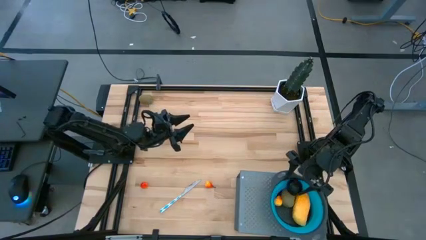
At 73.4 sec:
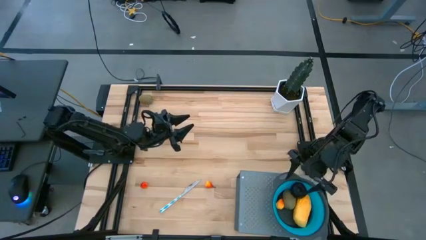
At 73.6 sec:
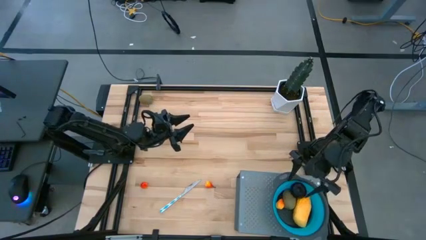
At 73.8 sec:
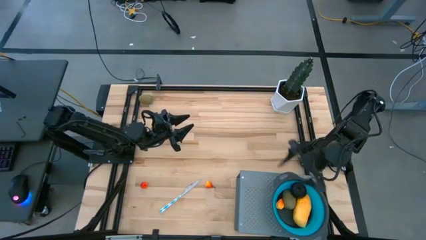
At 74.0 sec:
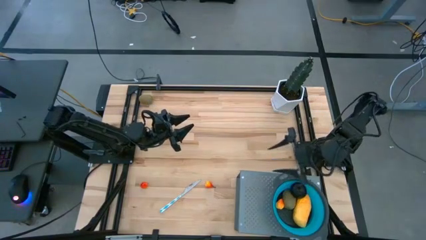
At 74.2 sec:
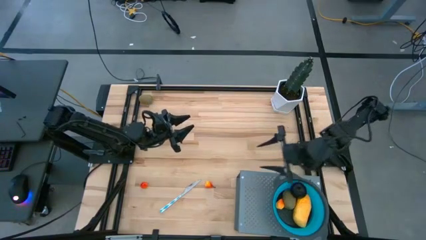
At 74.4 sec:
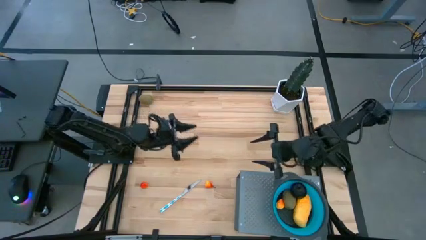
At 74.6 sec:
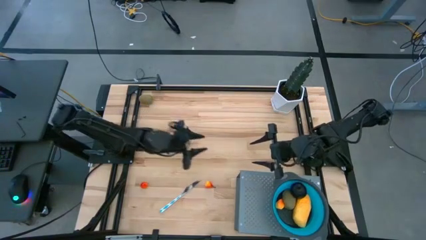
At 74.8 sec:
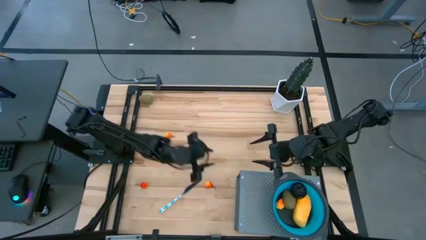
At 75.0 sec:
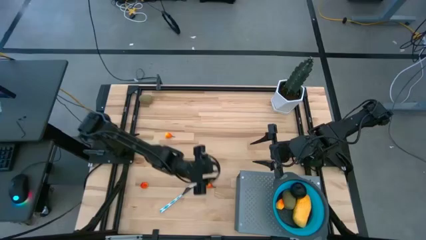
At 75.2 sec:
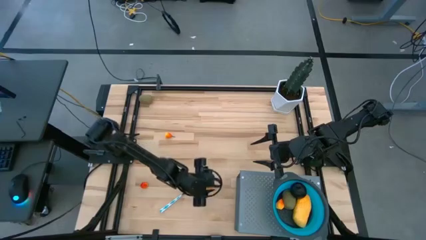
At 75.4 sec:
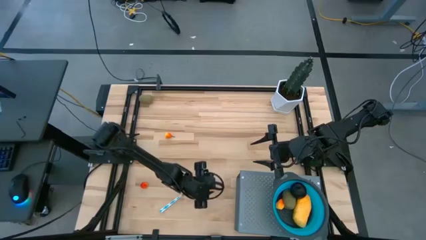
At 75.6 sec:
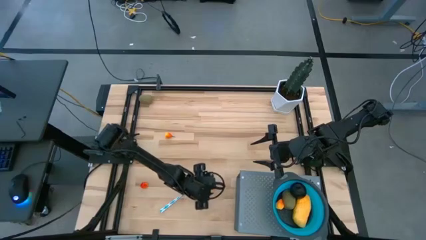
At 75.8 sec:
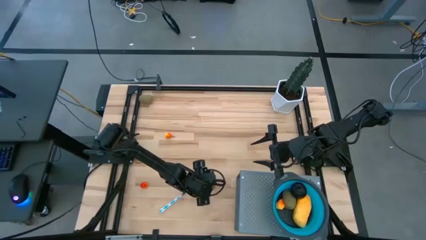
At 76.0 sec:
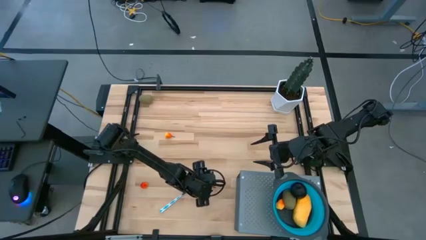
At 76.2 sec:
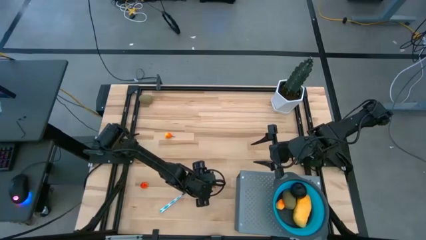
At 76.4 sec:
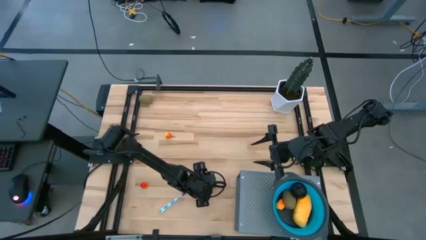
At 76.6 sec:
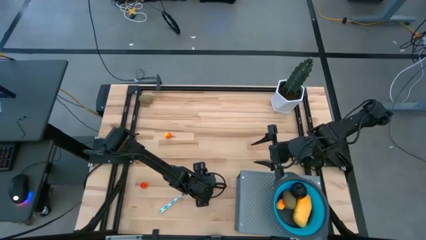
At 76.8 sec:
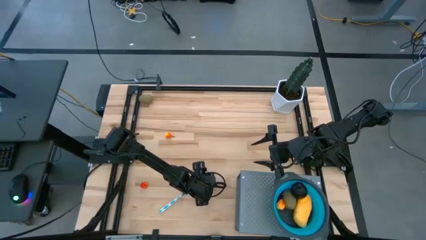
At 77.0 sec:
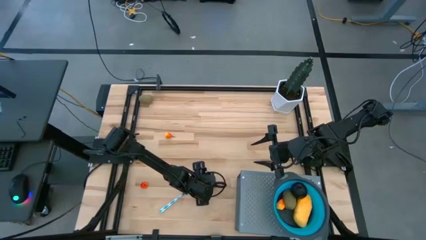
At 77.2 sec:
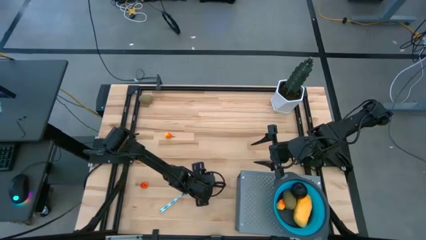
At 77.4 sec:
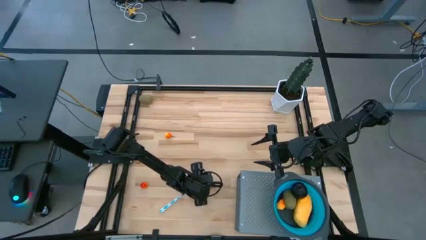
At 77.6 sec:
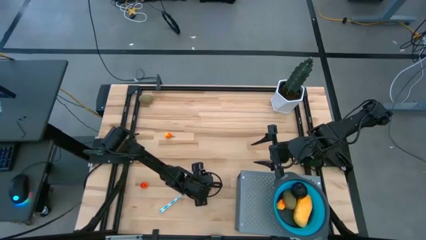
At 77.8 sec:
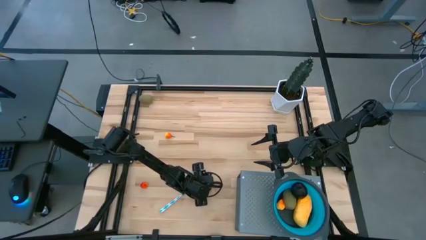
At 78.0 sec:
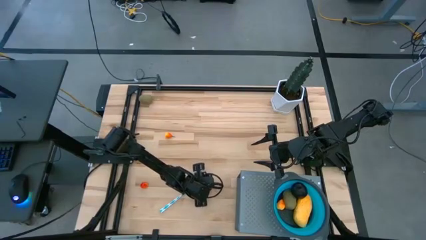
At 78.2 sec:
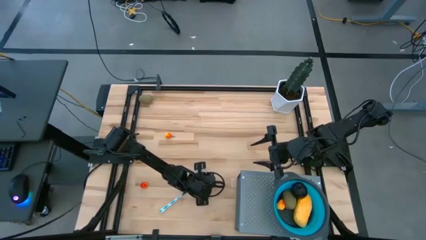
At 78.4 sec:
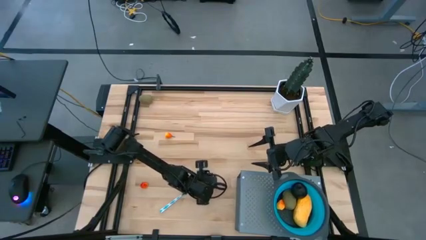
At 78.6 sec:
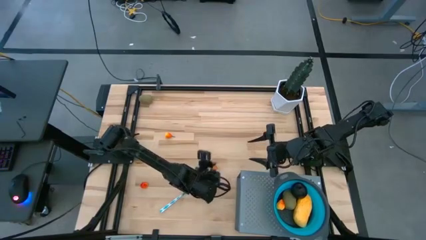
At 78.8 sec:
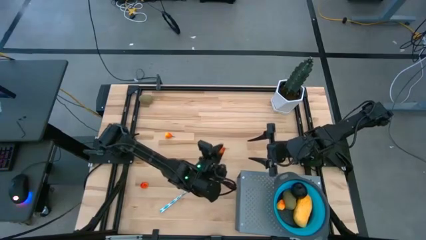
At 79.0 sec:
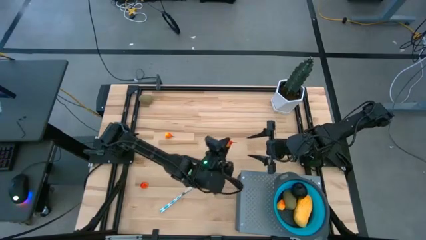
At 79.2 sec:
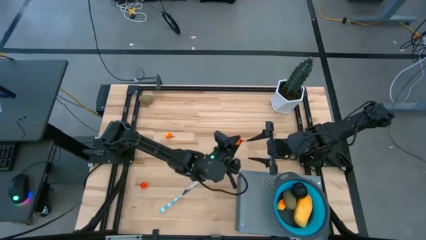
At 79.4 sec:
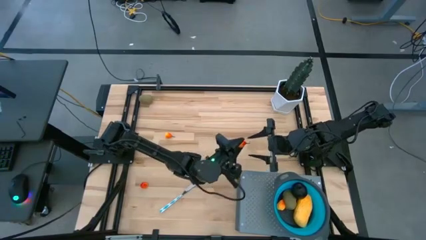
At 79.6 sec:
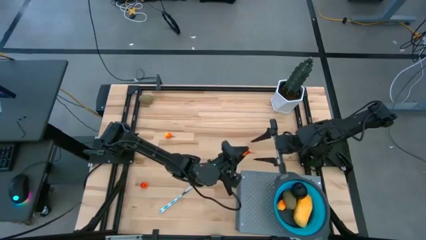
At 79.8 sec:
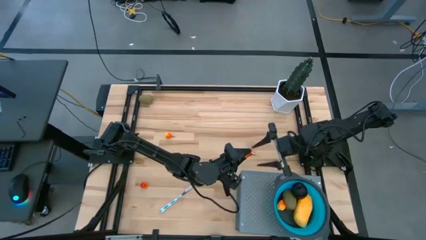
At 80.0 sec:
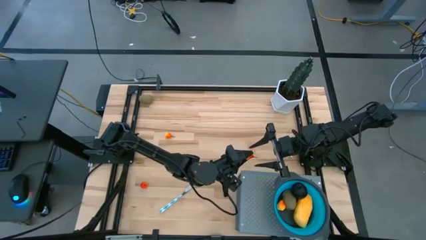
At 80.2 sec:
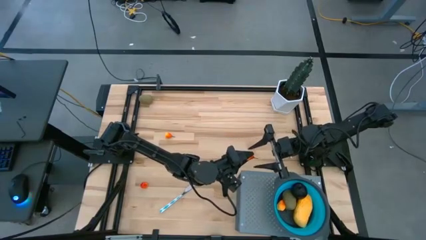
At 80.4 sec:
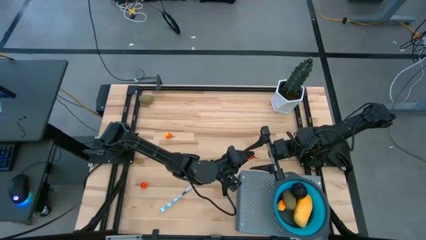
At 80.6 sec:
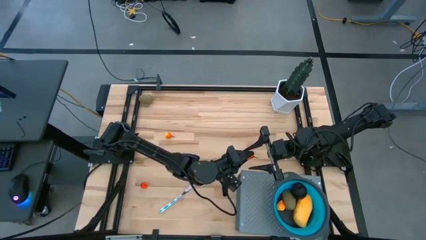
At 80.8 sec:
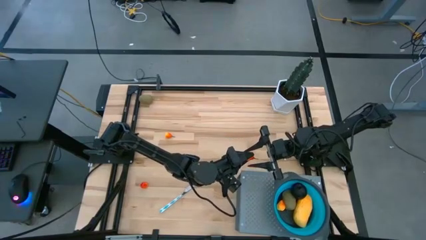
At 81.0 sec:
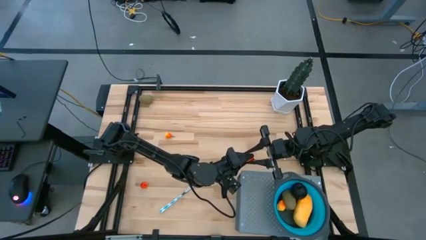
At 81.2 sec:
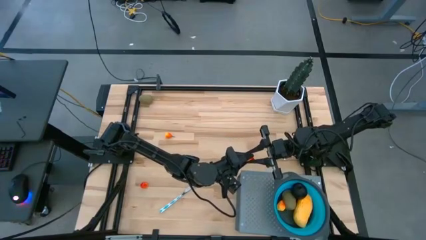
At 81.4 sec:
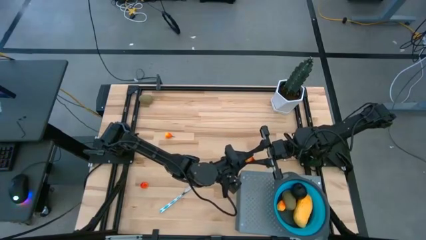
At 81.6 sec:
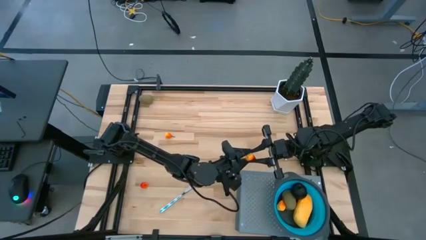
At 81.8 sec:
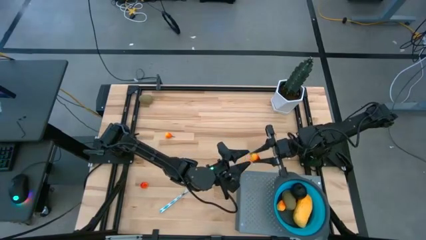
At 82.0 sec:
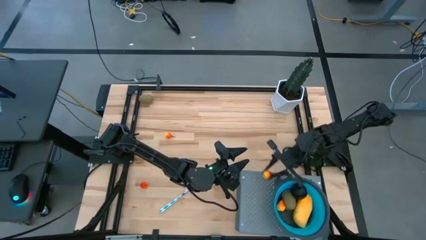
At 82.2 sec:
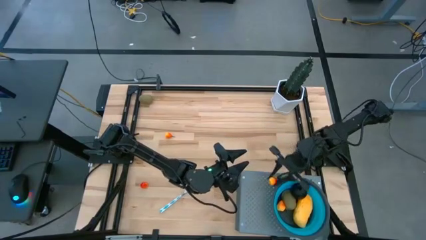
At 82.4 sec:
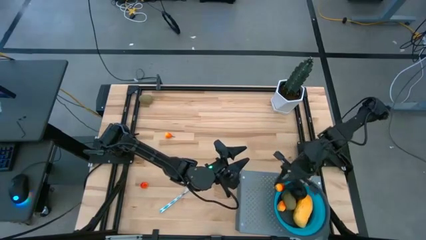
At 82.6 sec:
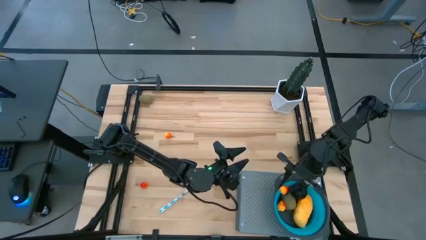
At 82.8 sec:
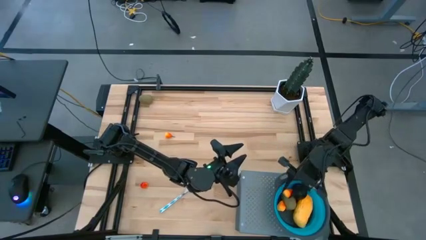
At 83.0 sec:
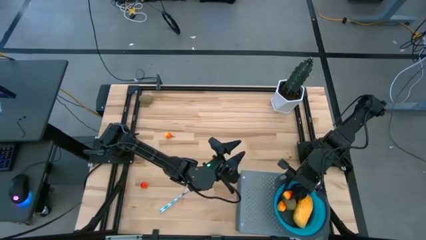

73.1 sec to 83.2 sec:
Task: Pick & Place Fruit
Put the yellow pear into the blue strainer bowl on the shelf

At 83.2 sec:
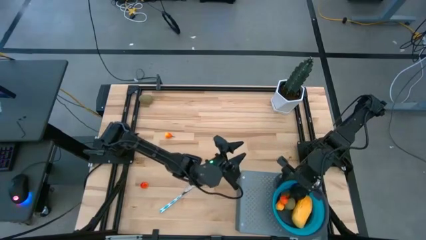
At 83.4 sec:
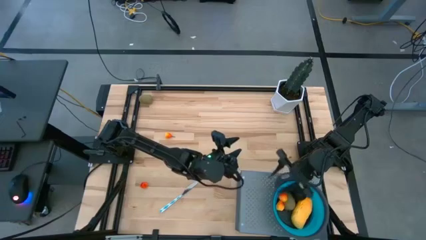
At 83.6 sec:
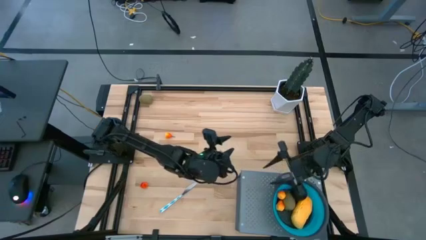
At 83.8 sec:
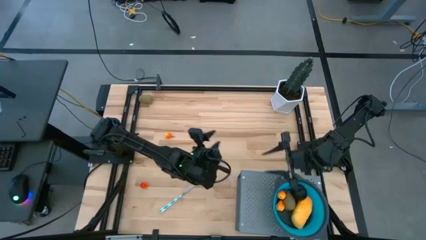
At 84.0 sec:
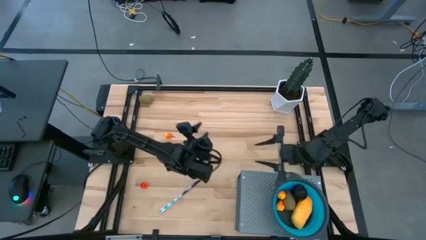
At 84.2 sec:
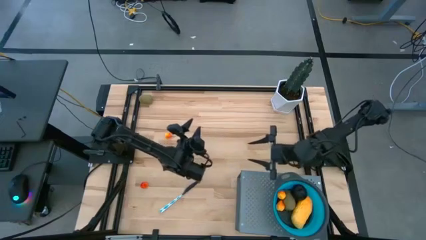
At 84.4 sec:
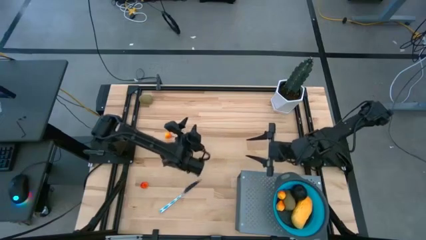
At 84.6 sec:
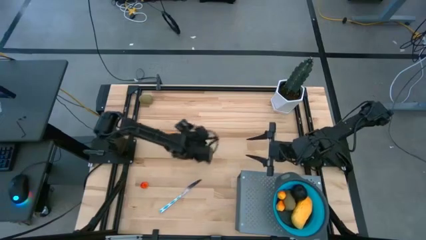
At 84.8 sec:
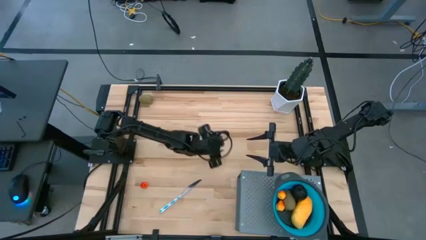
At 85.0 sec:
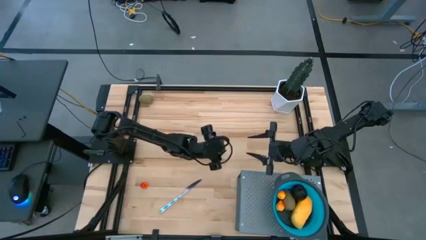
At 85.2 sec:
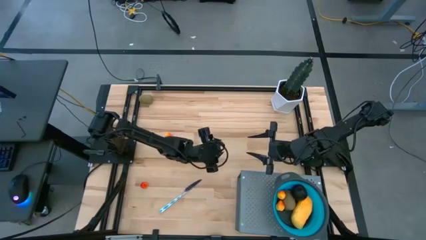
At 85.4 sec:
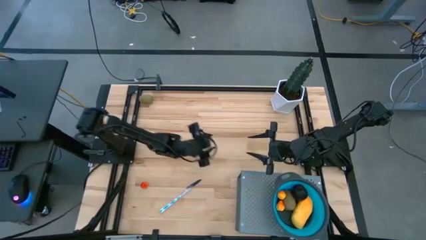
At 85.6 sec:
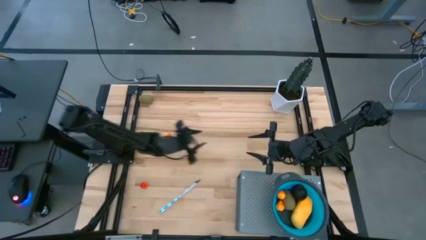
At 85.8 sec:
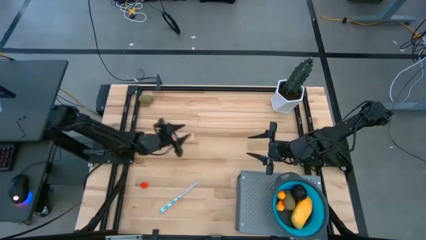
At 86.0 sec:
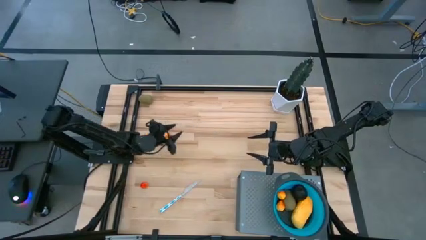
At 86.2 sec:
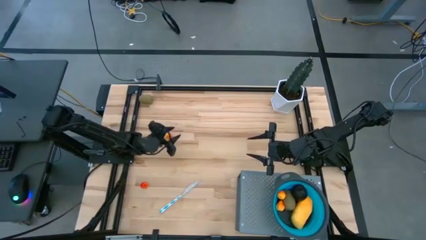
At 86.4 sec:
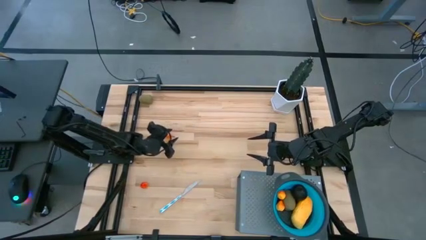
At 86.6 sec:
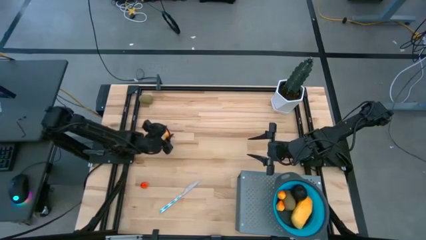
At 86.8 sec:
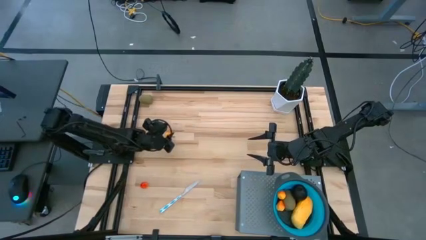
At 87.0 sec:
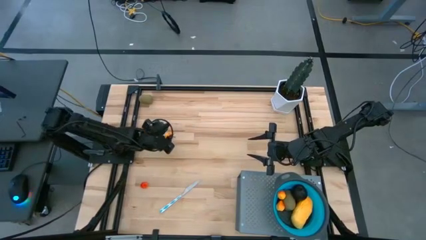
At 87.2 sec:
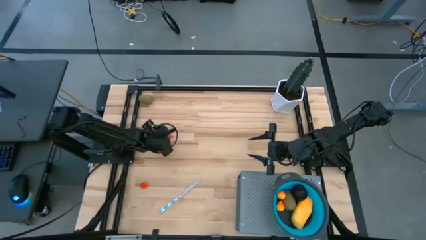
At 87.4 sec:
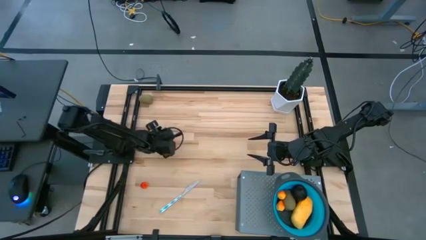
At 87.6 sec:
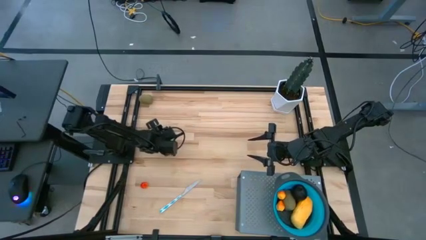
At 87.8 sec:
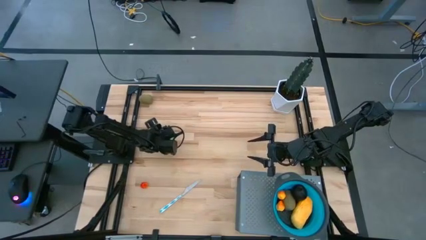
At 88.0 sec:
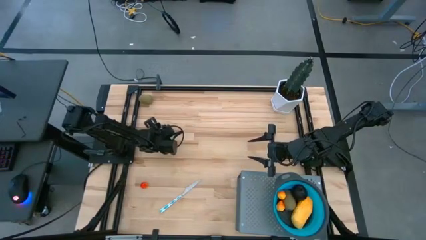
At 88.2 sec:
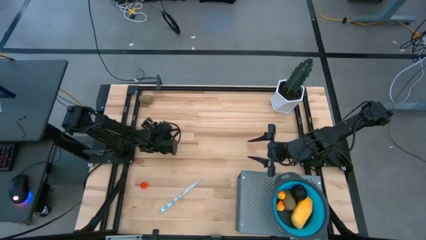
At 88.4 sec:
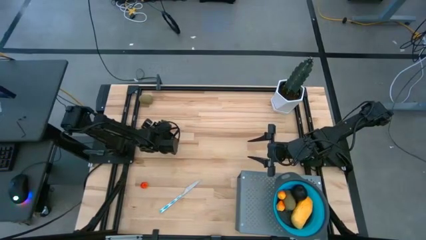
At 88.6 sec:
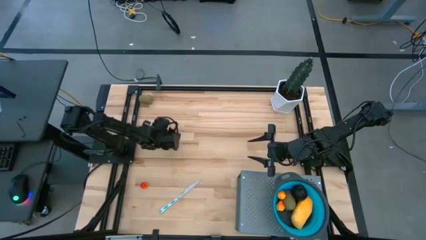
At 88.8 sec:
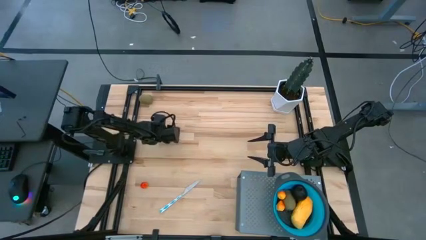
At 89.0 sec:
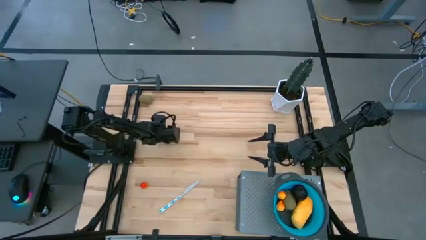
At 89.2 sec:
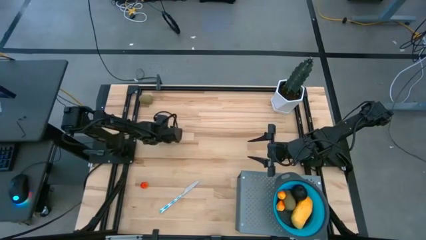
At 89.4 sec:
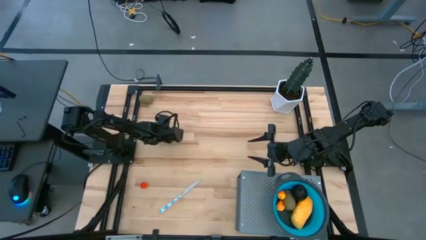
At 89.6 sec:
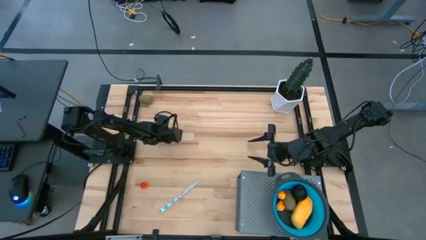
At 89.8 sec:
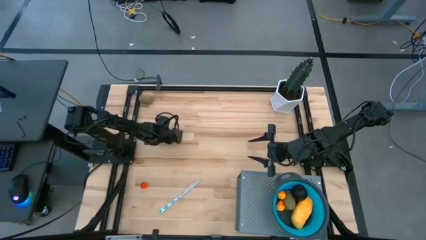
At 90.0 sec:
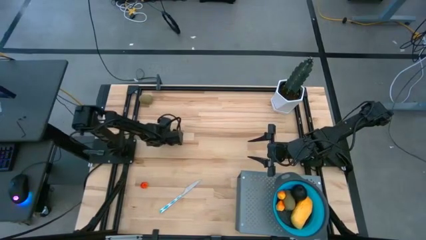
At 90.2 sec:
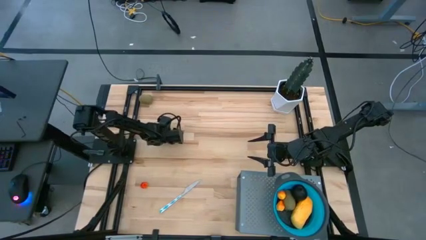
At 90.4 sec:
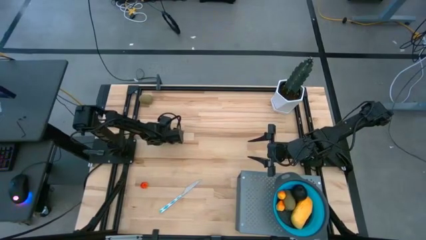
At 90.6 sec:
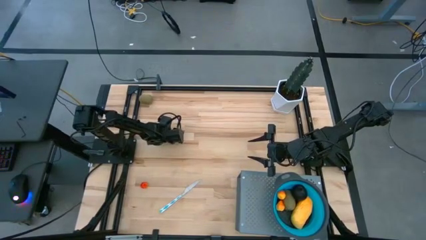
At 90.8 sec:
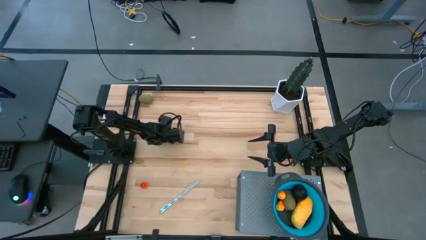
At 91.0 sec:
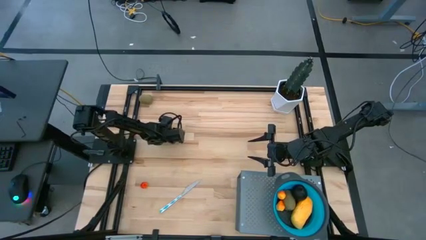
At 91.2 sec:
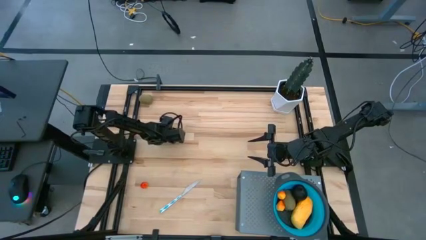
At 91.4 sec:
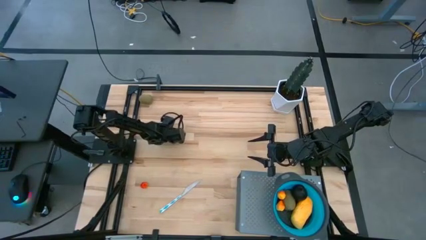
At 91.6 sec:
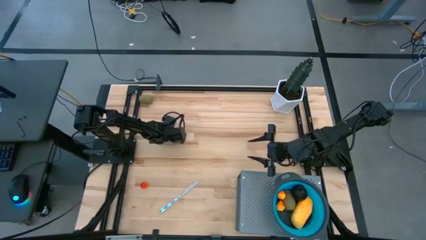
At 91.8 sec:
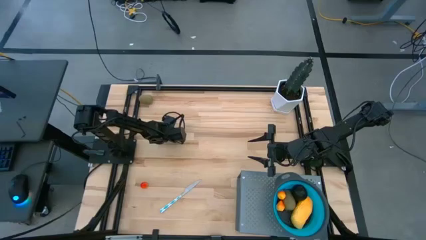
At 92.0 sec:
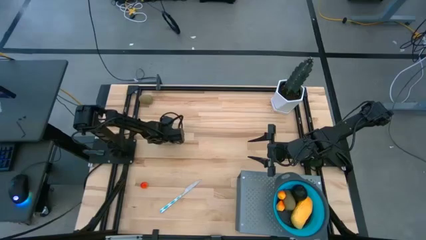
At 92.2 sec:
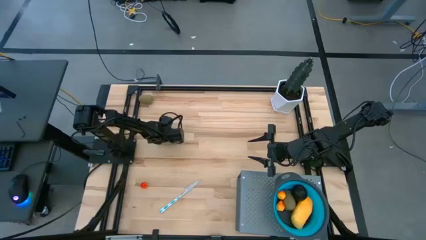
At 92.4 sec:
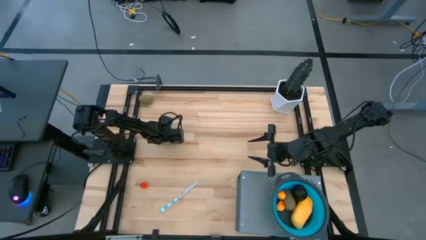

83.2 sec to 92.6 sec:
Put the yellow pear into the blue strainer bowl on the shelf
